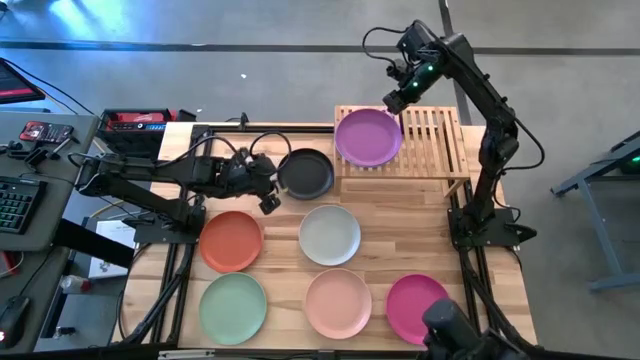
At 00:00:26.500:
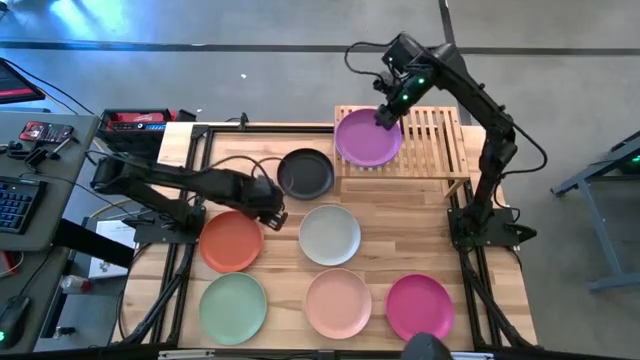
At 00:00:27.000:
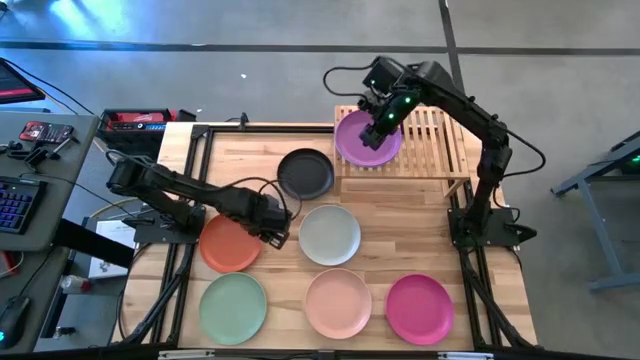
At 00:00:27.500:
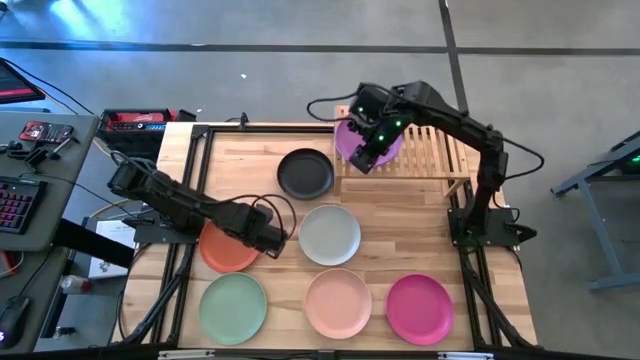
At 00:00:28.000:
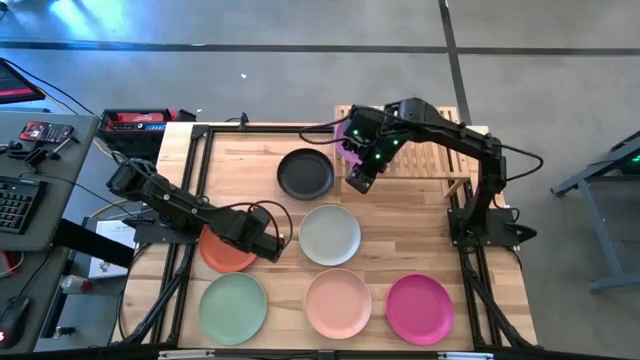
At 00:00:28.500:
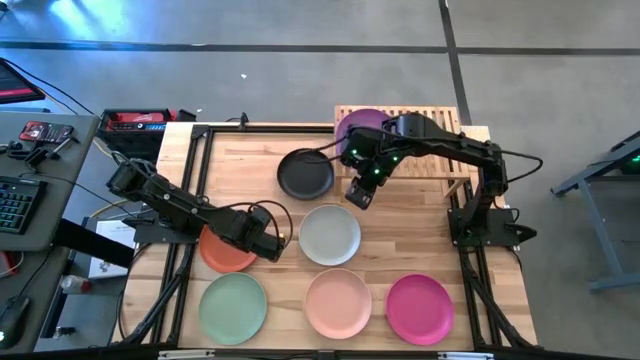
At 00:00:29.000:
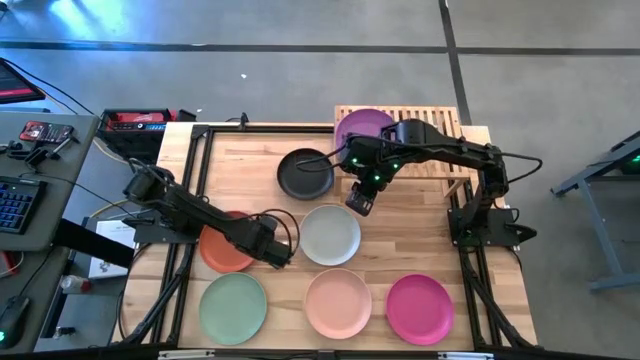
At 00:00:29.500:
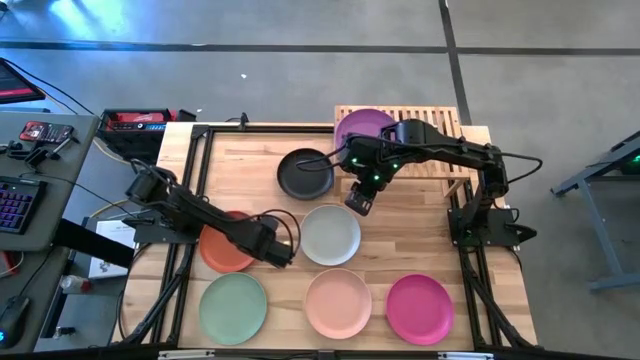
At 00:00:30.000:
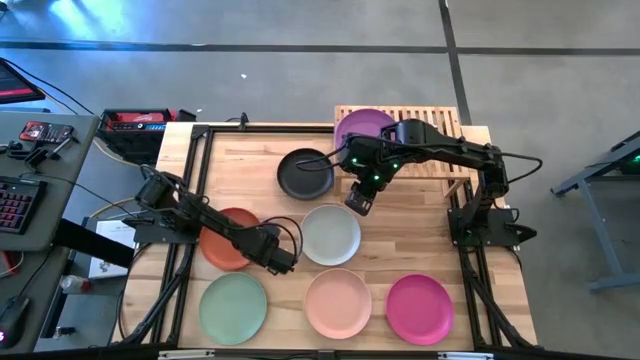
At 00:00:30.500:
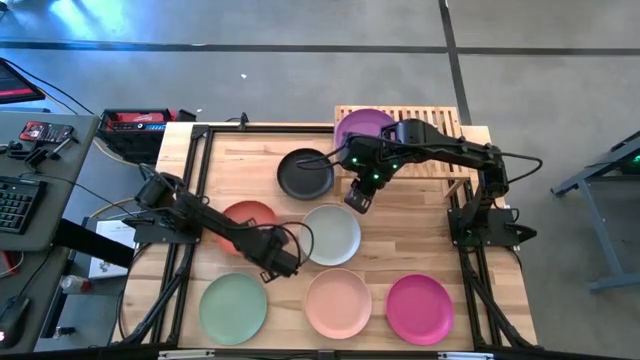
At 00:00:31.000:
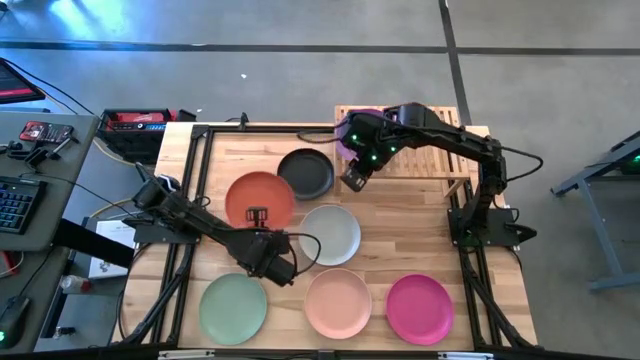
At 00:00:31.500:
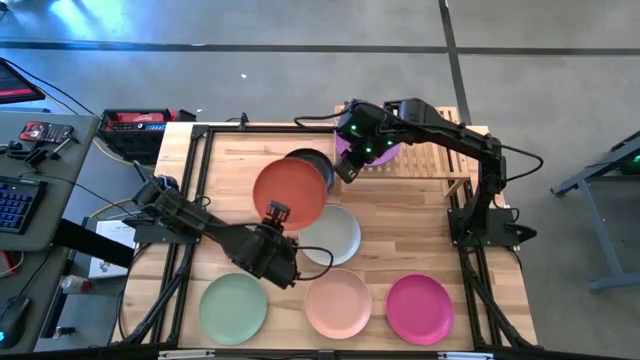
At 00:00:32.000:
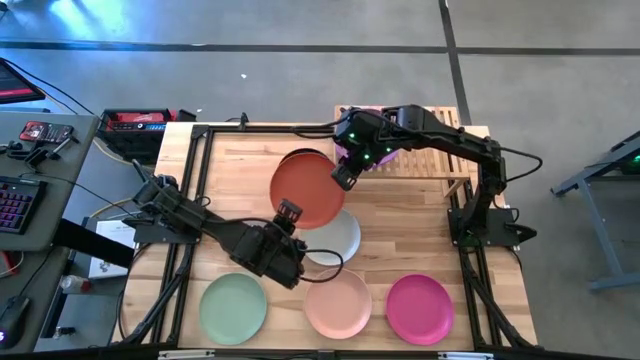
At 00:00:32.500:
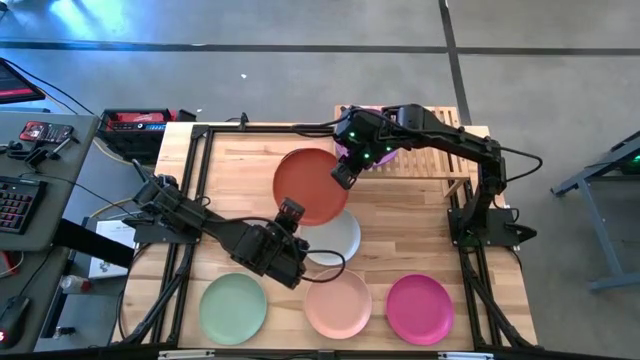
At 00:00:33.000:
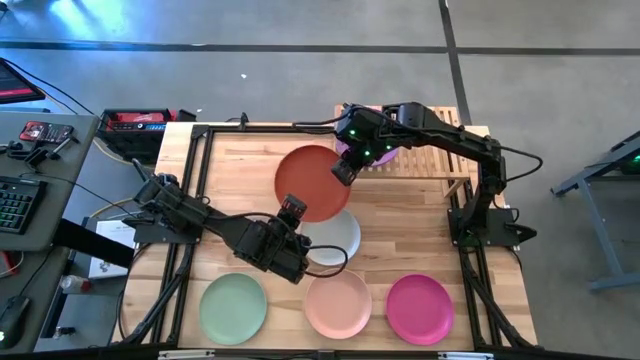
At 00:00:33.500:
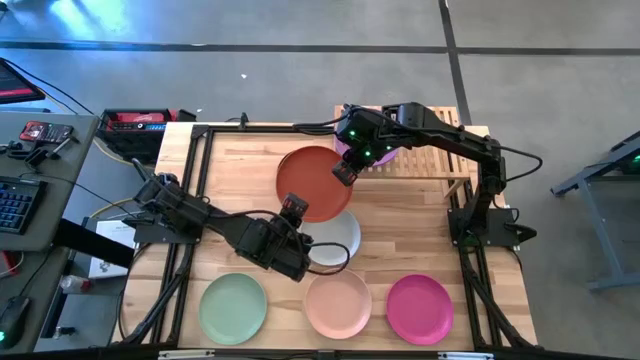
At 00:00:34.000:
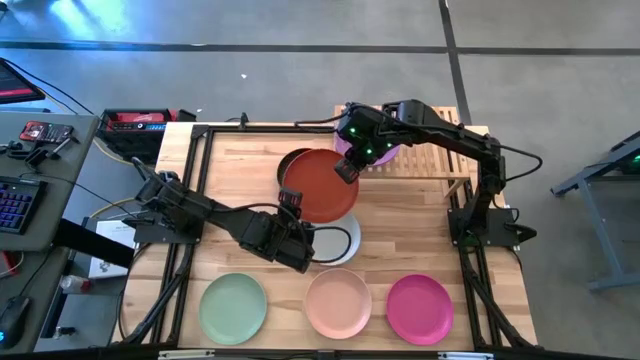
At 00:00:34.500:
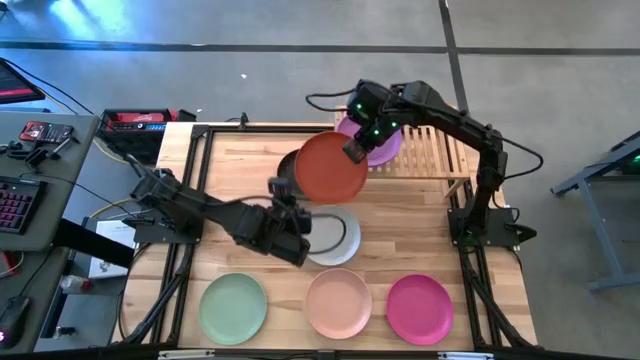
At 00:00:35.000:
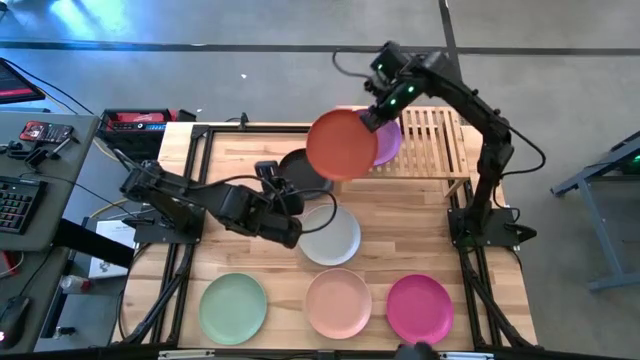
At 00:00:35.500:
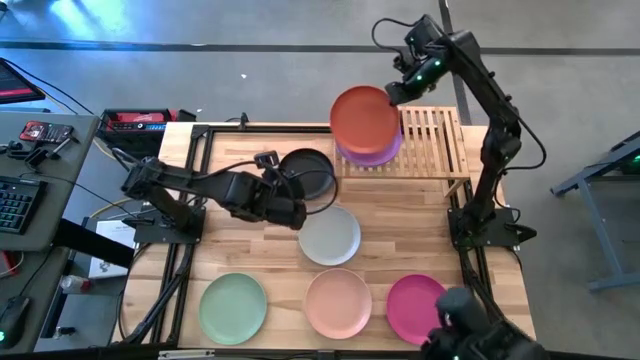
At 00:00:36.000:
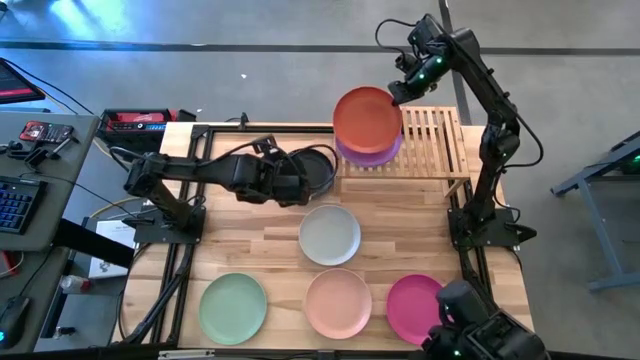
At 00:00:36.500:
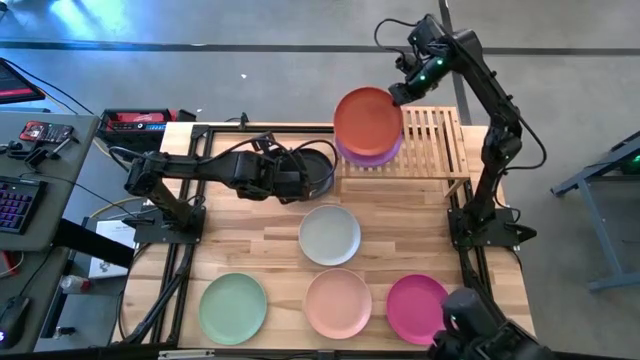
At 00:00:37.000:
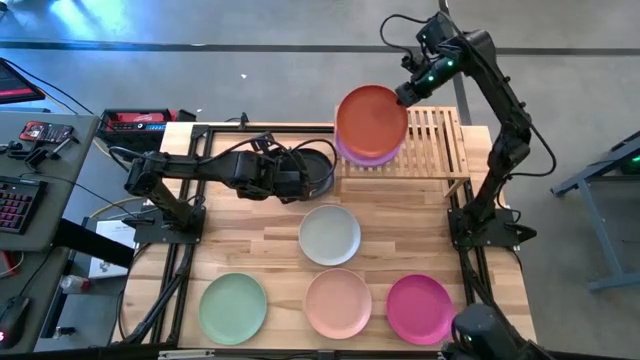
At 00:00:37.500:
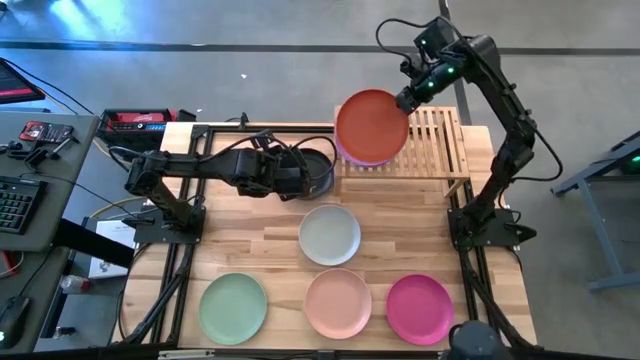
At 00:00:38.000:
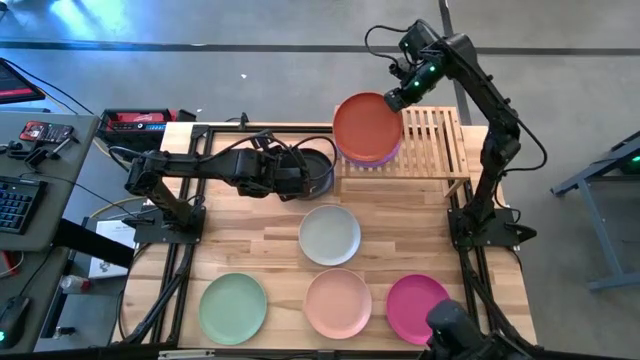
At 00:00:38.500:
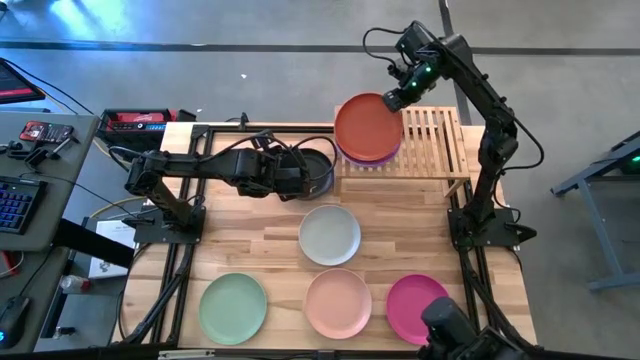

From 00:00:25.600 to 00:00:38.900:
Task: Place and stack plates onto a shelf
Stack the orange plate on top of the purple plate on the shelf

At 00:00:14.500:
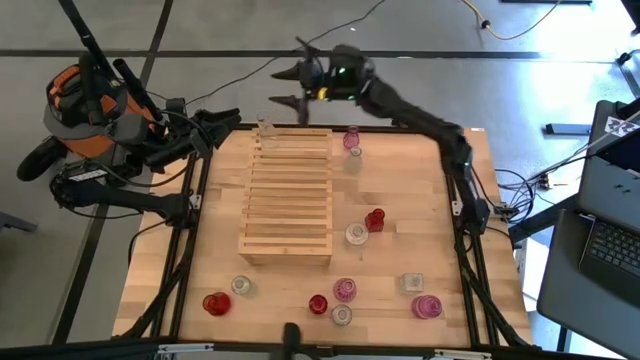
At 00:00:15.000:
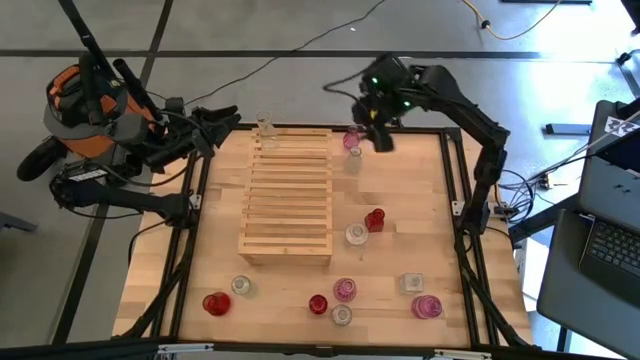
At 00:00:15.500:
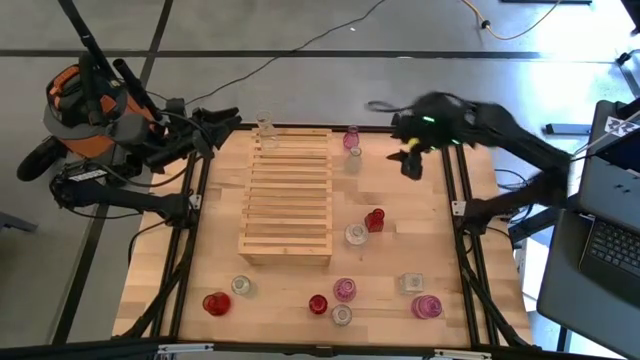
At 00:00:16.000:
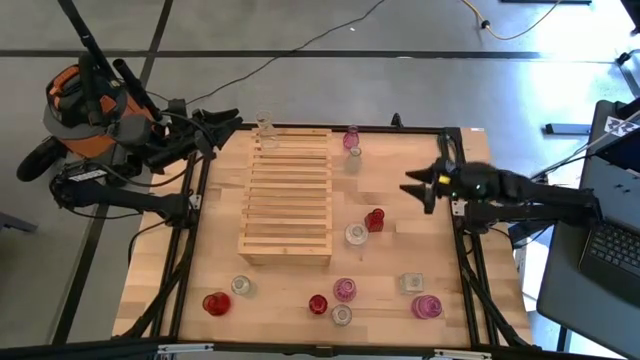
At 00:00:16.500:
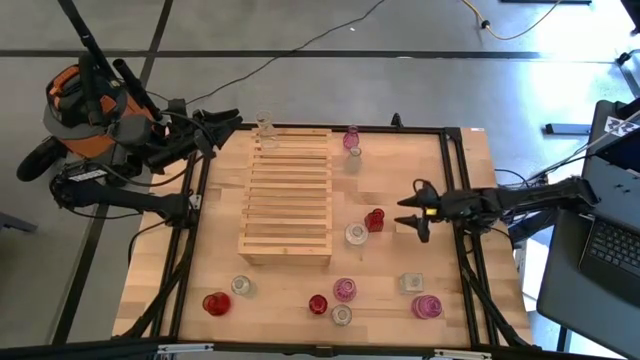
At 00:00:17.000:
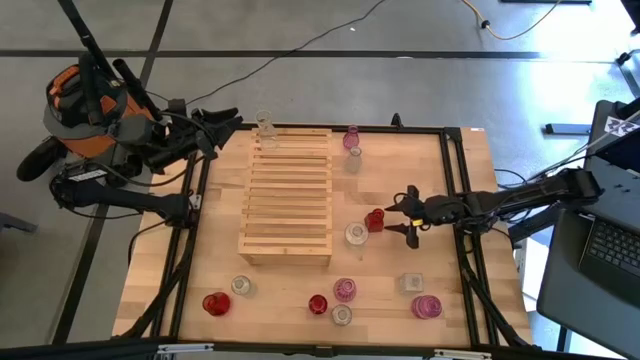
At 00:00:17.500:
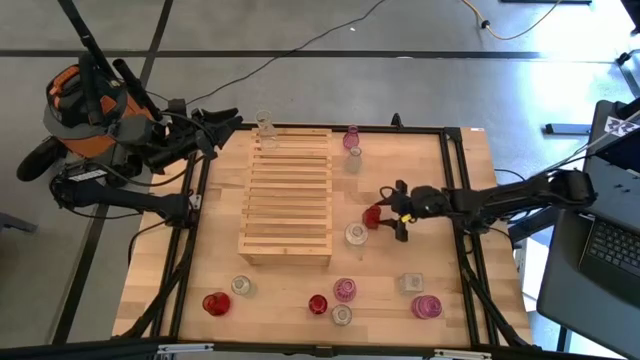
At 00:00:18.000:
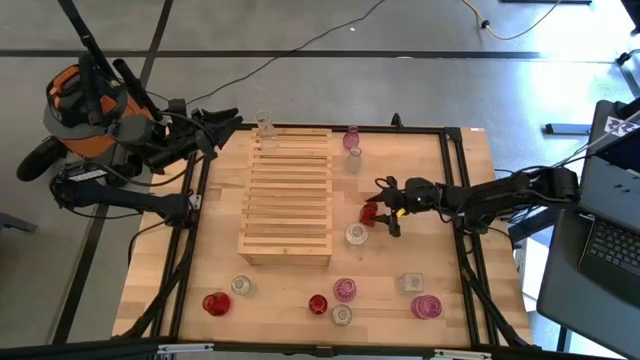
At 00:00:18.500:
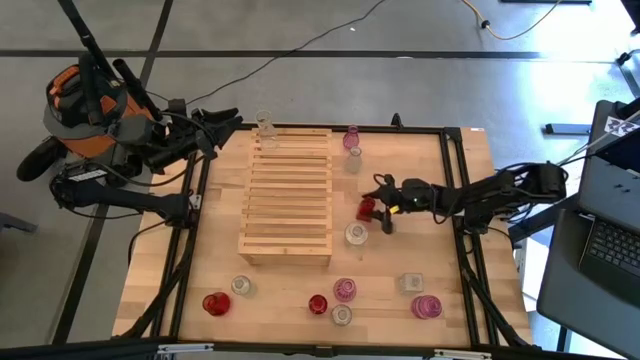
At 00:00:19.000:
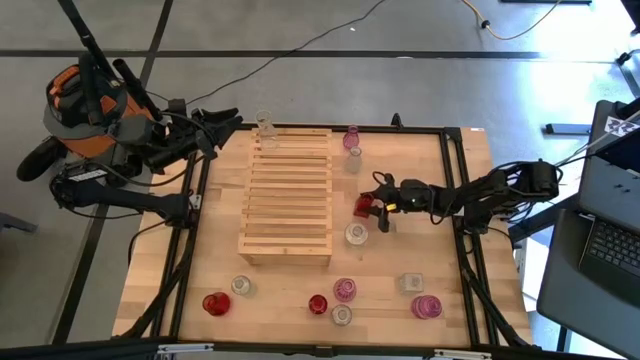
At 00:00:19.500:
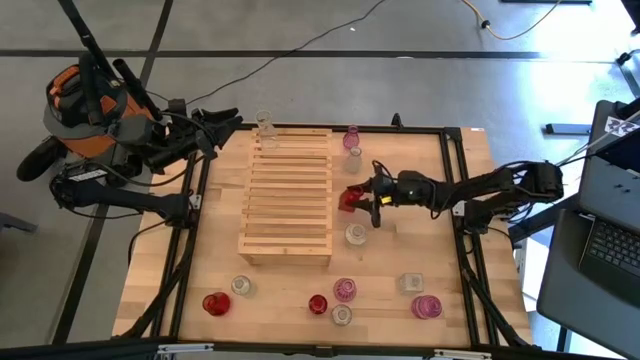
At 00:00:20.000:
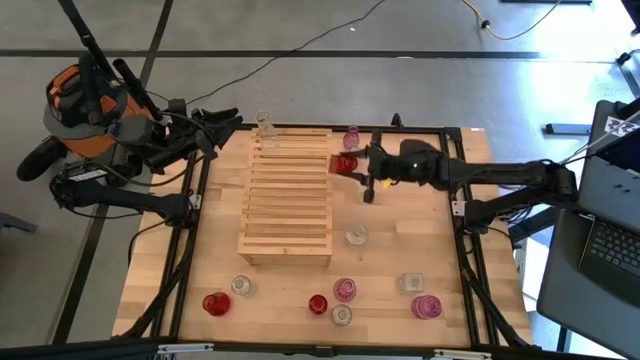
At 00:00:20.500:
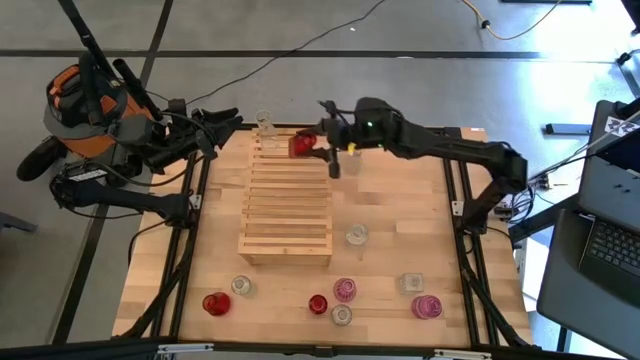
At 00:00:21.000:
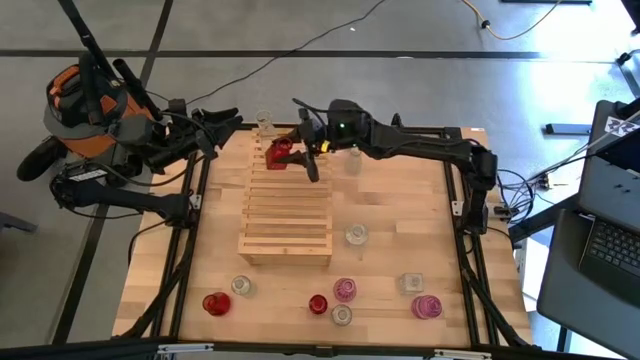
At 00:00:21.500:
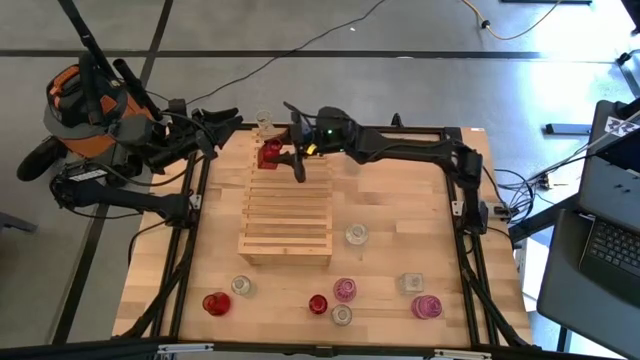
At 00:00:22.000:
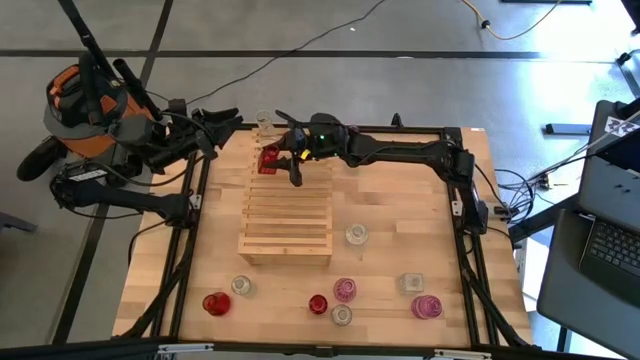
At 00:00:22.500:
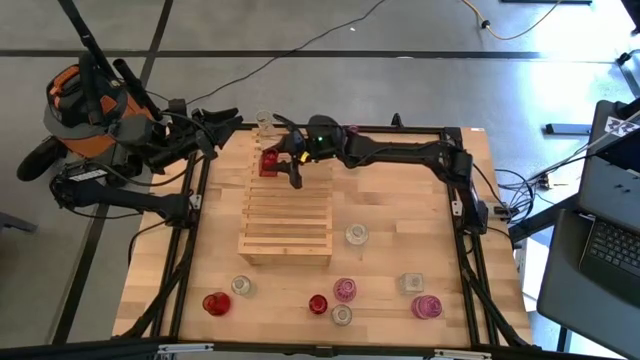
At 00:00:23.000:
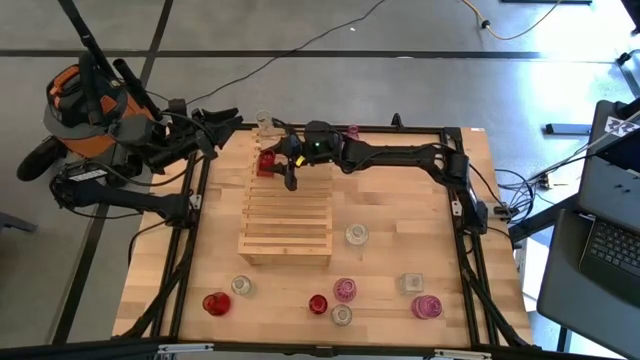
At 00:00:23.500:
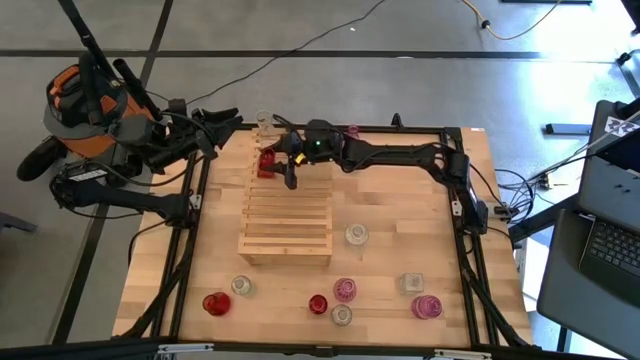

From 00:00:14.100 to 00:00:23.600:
Task: sort vases onto shelf
Put the red vase on the shelf
